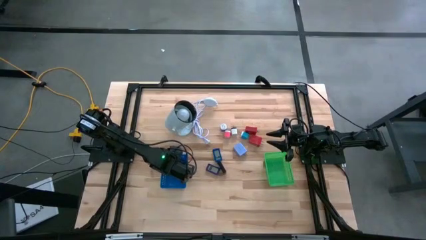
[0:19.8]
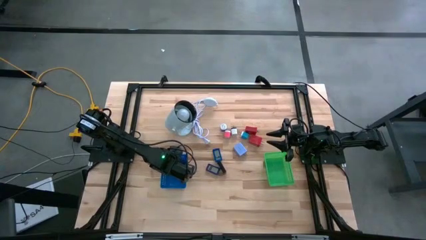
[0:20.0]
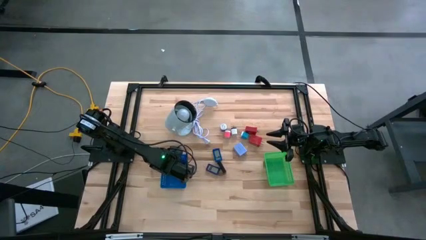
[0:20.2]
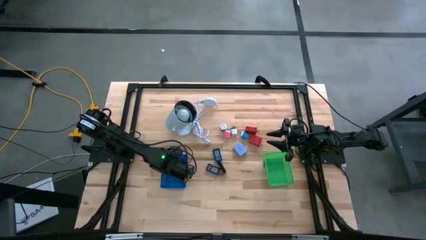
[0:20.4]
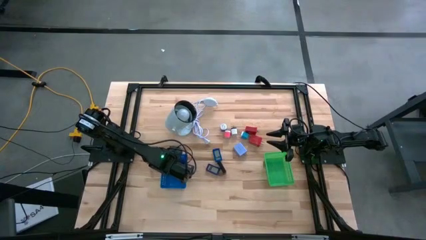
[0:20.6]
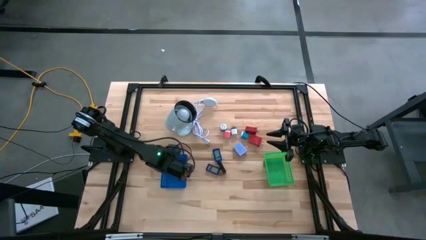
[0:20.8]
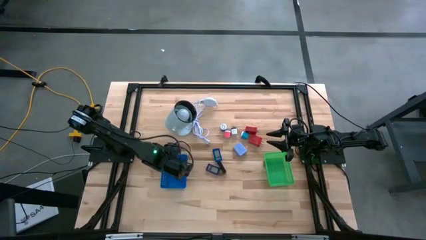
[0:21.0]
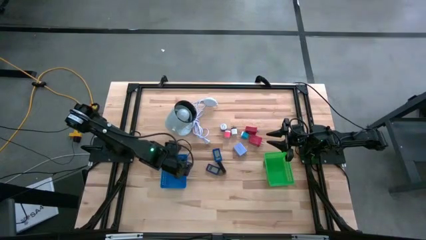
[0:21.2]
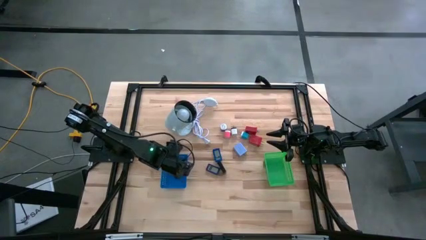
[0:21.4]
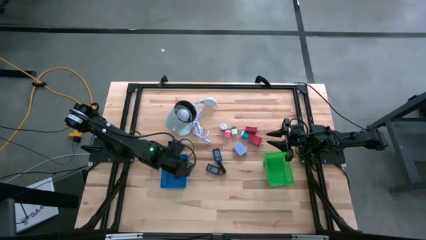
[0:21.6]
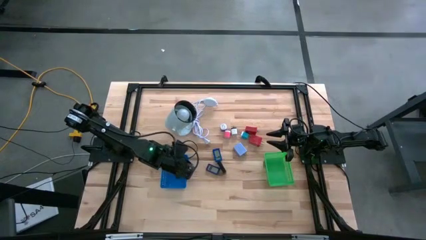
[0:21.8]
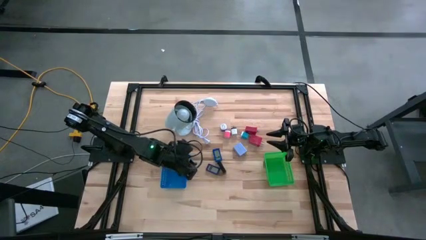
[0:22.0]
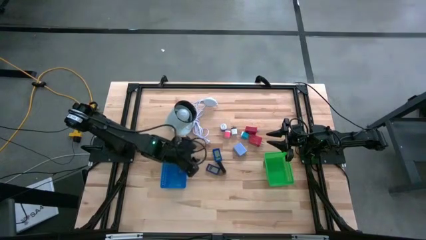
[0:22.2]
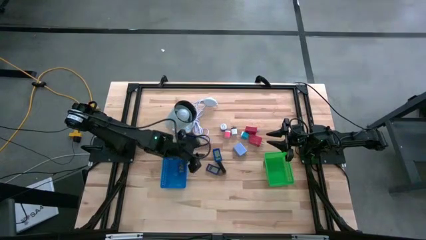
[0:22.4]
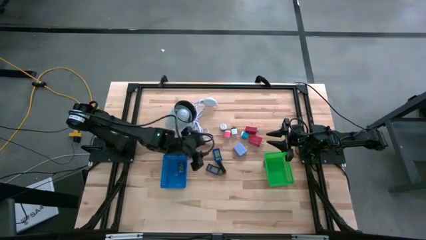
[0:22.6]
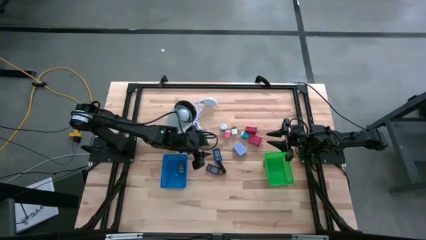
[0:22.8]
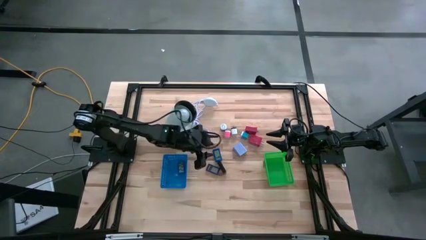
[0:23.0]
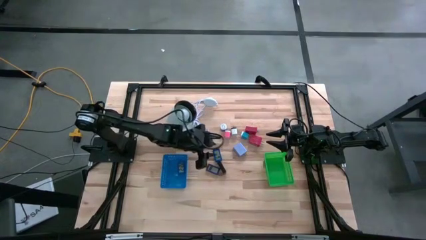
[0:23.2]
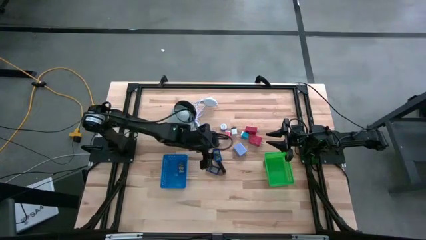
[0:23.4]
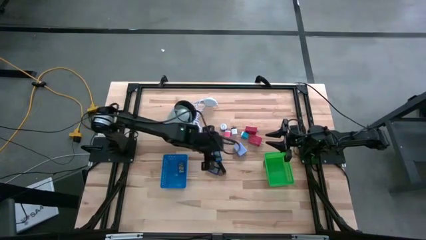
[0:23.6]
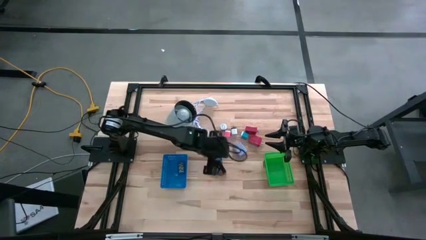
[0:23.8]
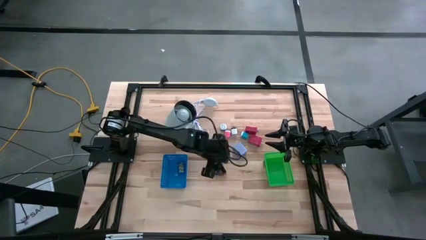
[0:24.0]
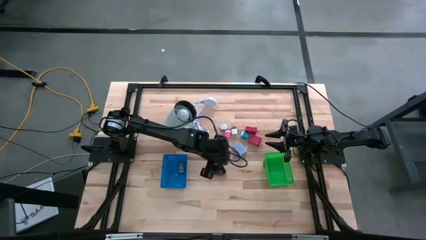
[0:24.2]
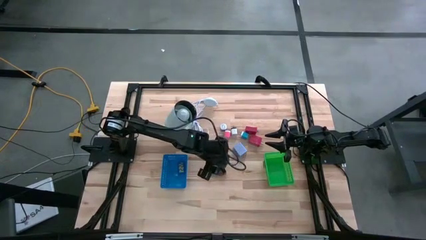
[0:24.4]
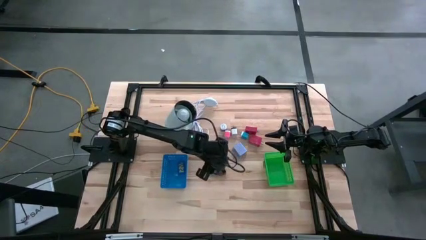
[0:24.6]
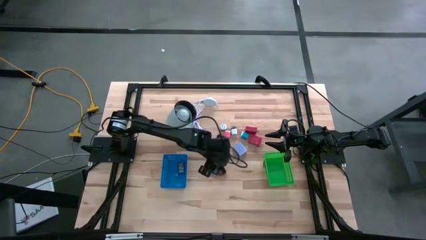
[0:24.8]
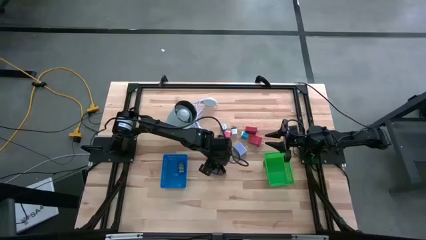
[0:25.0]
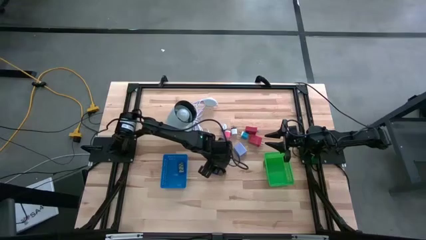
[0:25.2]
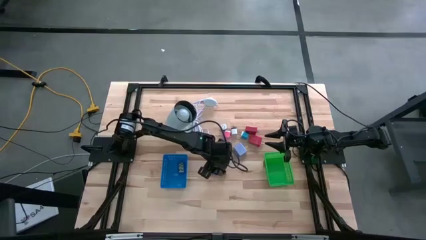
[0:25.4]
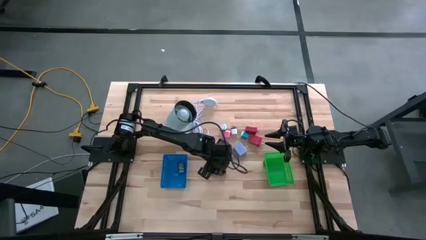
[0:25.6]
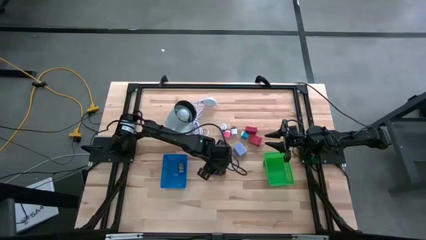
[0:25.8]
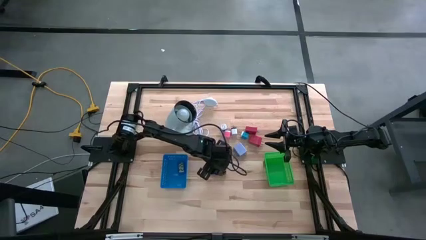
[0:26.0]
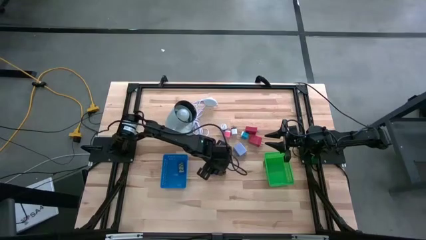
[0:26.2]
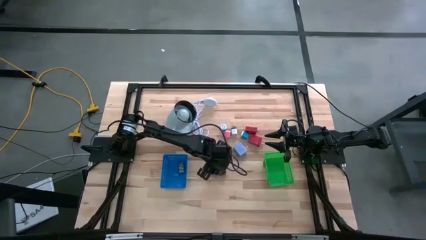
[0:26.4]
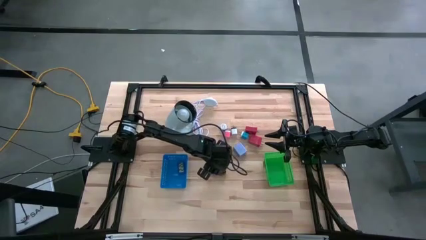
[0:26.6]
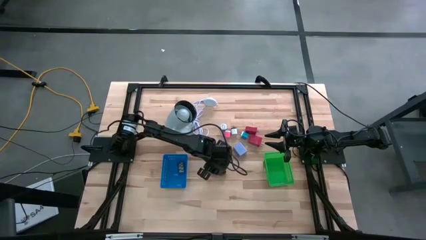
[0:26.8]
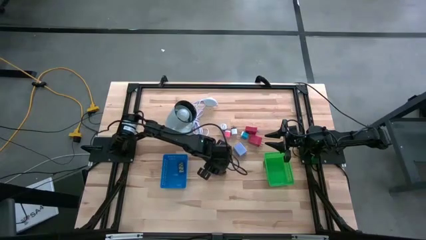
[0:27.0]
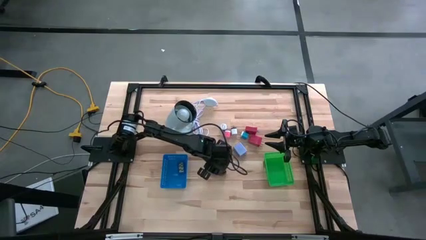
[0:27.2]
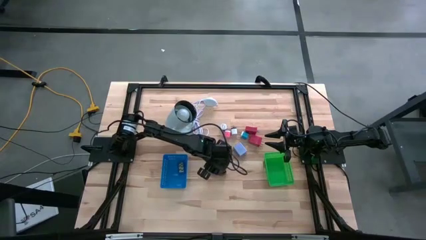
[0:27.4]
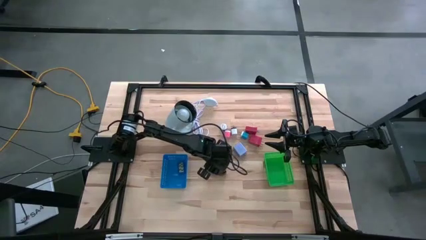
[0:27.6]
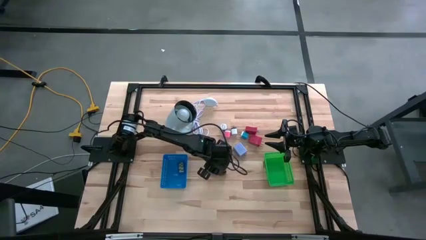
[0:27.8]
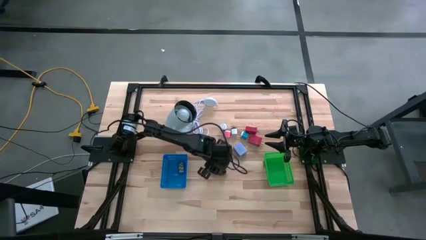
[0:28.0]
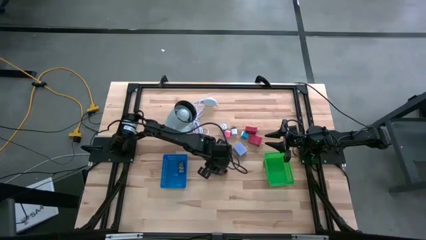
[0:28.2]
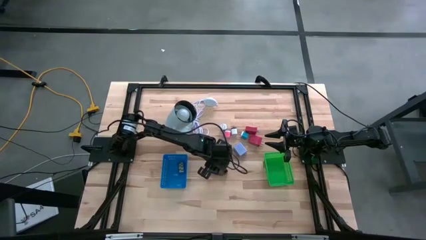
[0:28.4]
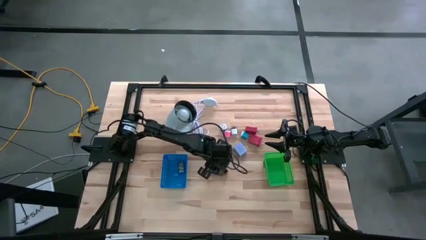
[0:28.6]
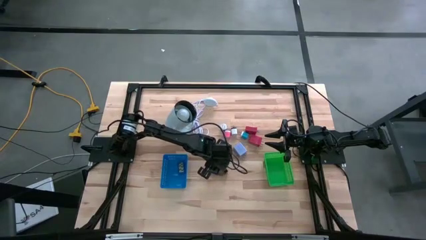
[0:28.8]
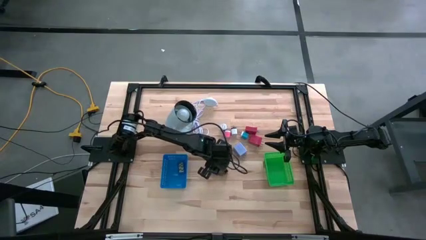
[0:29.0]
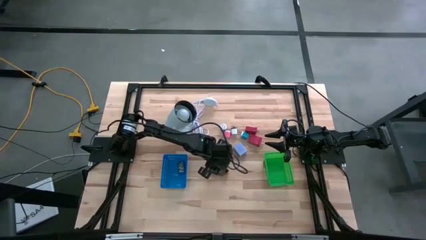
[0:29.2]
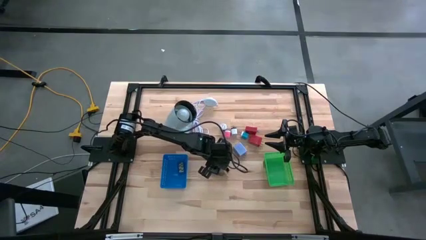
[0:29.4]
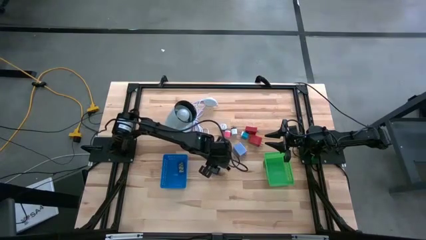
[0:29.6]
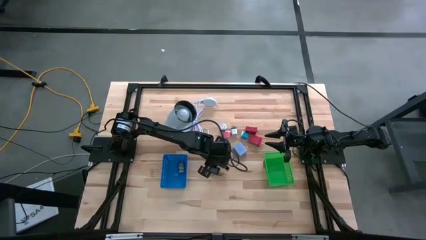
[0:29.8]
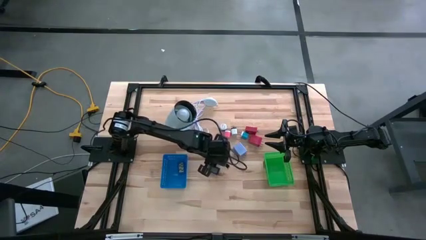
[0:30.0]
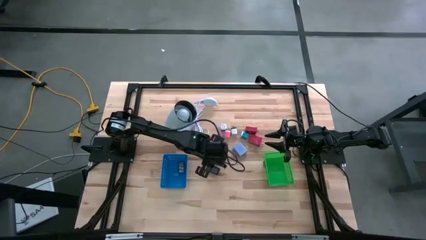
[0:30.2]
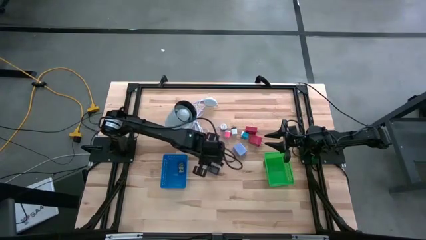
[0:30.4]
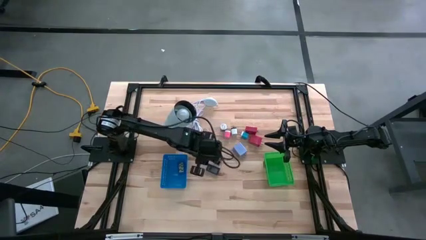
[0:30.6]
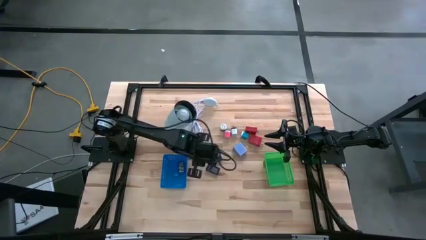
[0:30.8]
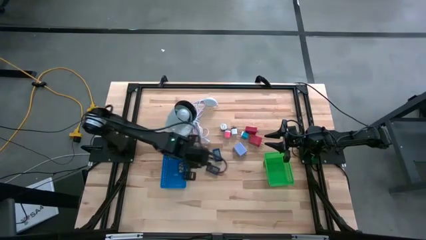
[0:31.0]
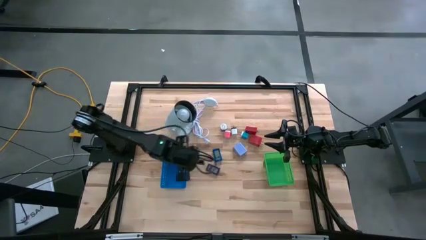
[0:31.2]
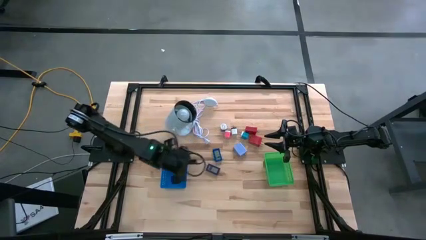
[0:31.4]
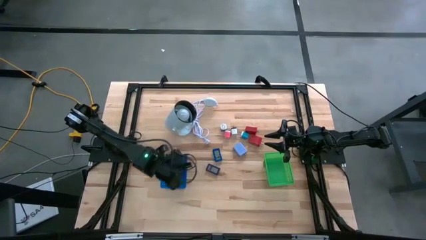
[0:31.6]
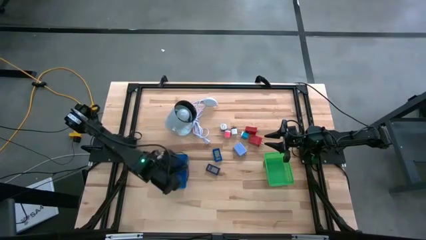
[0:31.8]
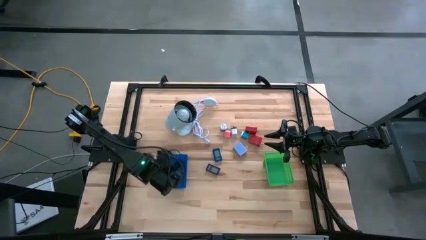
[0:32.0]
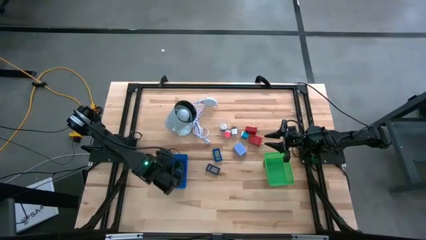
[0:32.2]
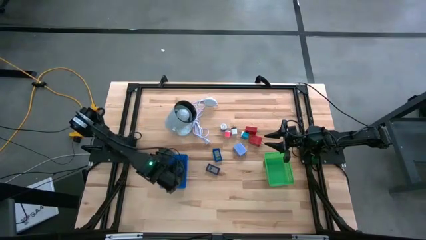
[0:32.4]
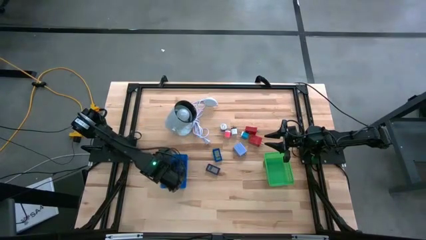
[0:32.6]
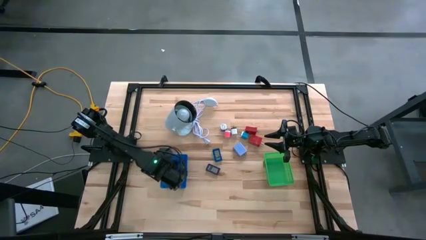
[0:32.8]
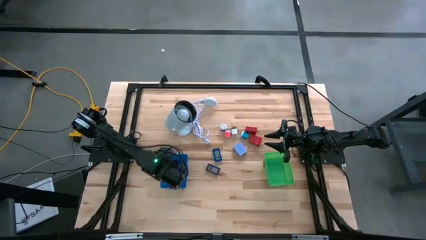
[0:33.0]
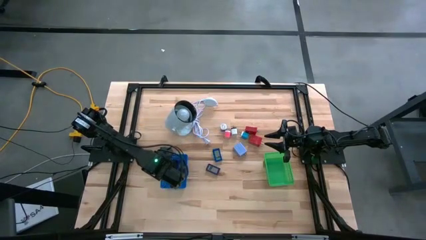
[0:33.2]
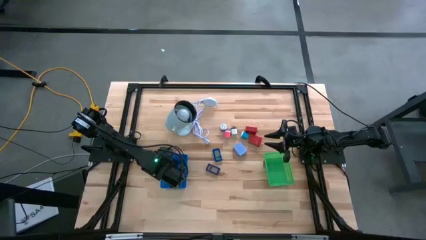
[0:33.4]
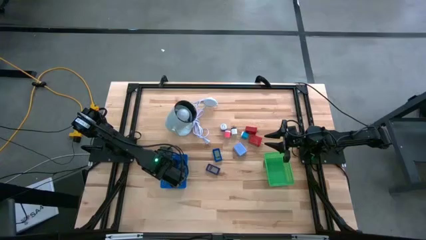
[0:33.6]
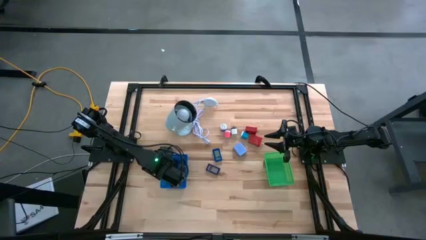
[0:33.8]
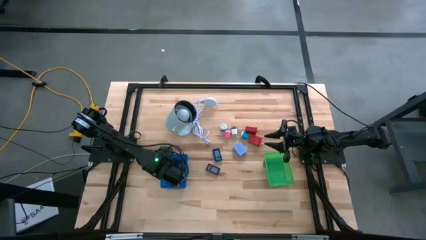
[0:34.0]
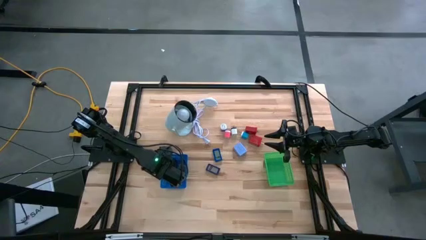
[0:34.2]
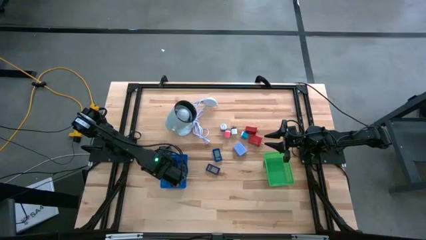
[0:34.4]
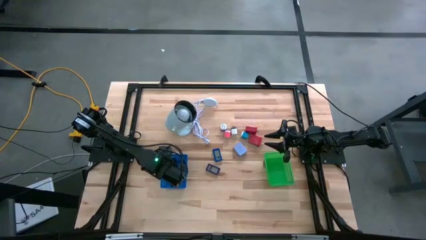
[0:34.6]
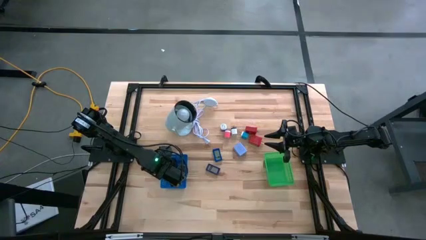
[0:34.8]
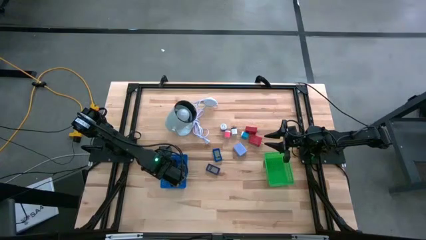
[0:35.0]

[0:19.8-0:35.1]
Task: Pick & Place Office items
Put the black digital timer into the blue bin

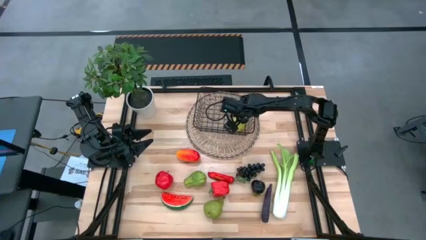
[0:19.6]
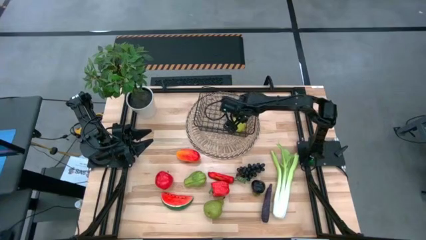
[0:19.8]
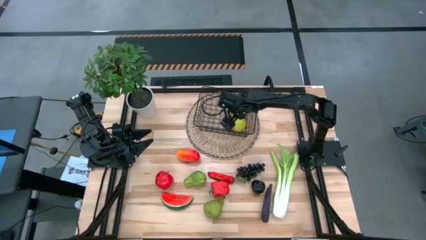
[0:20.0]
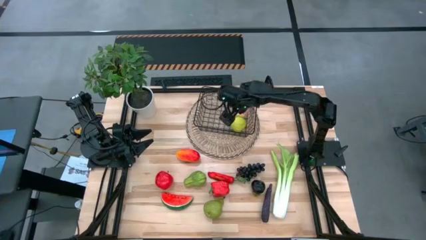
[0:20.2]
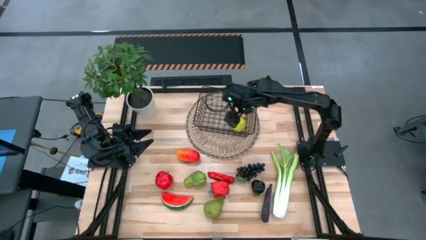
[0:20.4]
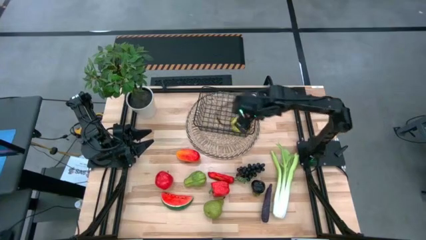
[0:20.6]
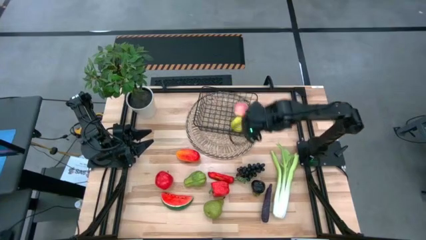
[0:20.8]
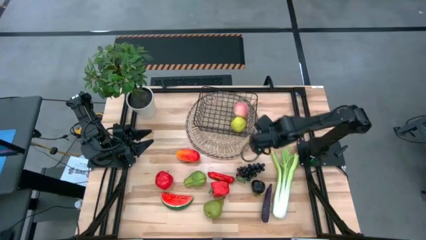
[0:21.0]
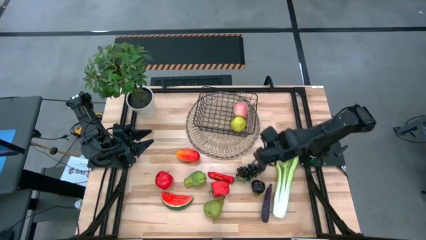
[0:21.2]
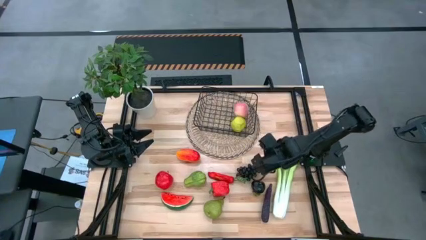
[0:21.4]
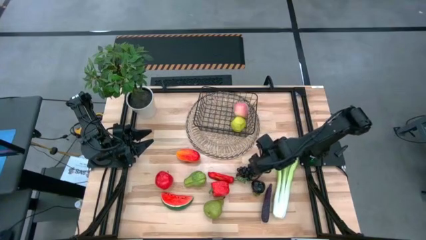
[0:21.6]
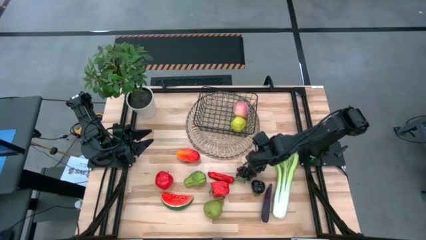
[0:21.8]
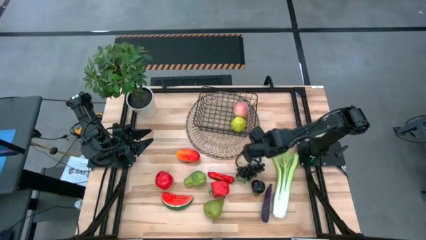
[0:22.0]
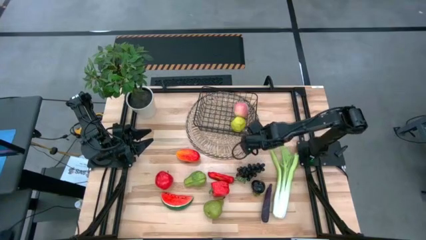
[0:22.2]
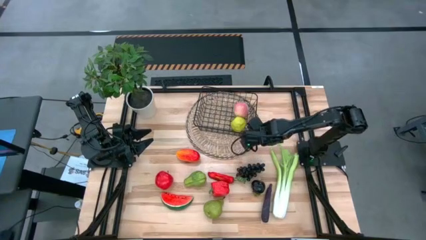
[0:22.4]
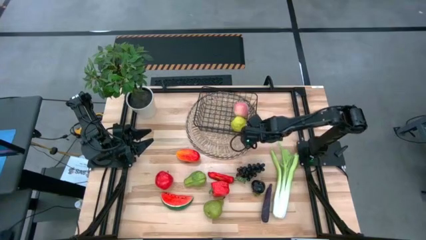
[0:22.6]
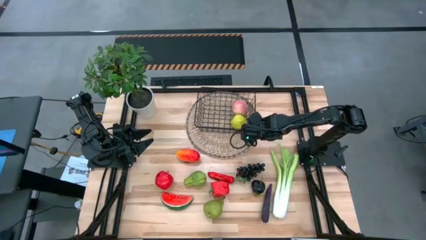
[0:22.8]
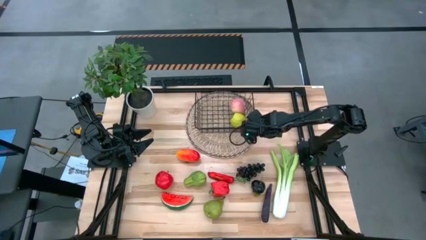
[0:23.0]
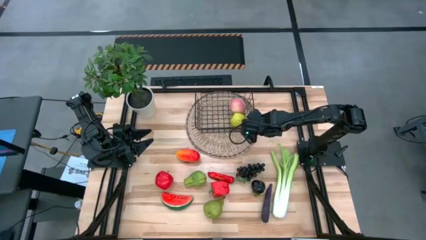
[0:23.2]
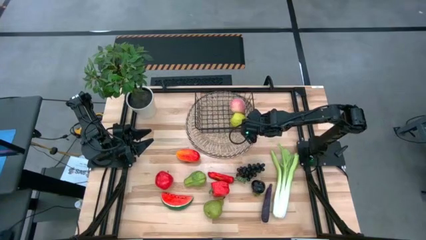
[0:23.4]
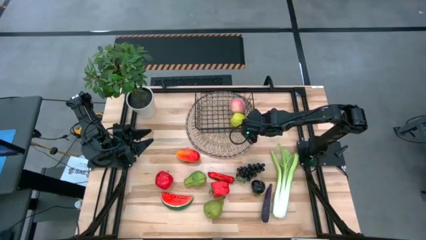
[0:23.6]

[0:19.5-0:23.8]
Task: Build produce basket
Adjust the black wire basket
